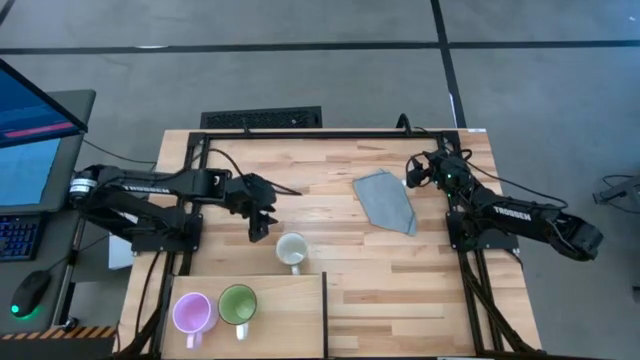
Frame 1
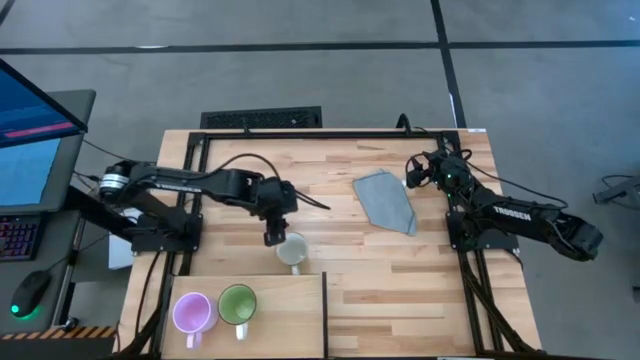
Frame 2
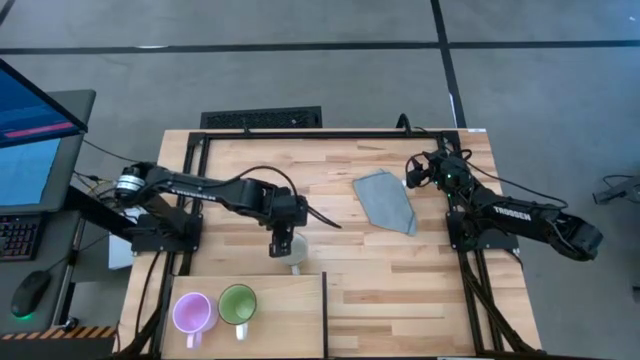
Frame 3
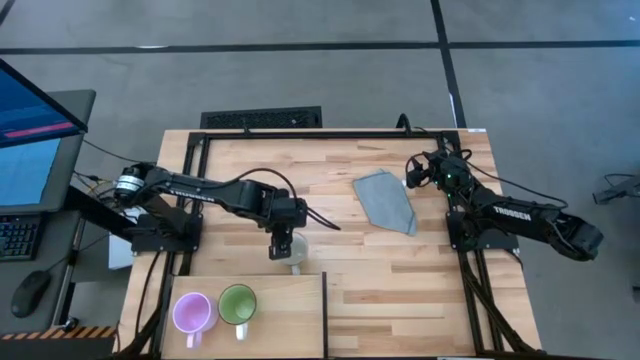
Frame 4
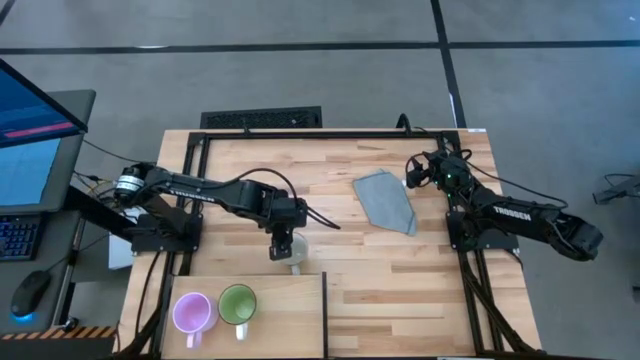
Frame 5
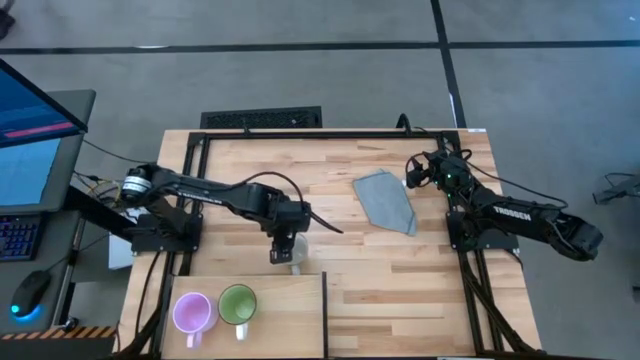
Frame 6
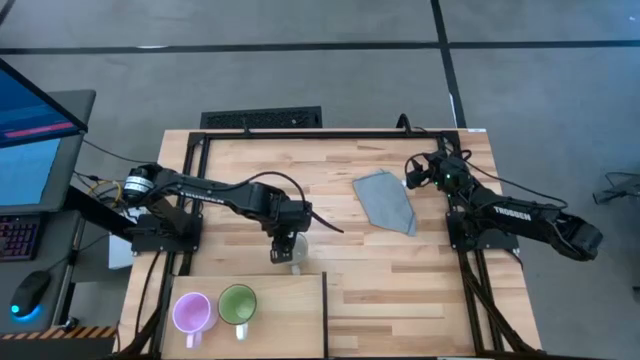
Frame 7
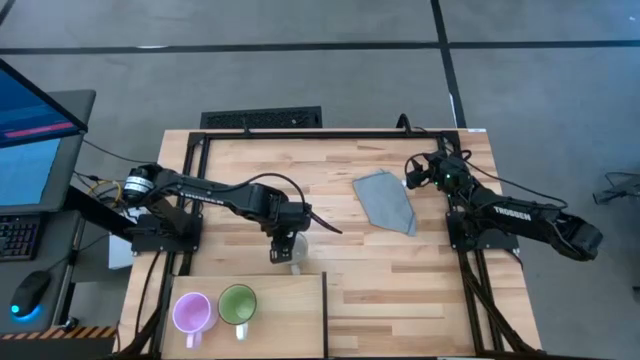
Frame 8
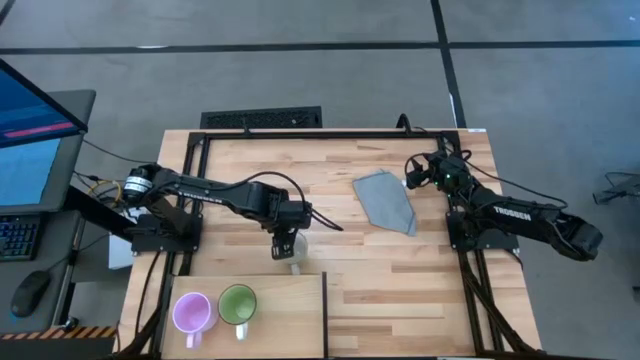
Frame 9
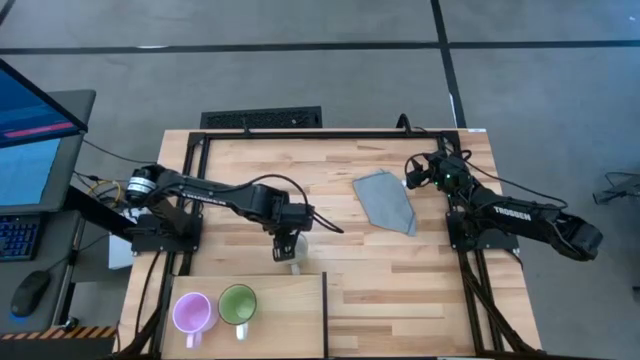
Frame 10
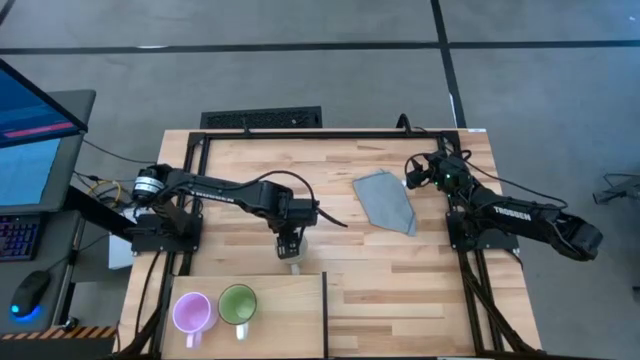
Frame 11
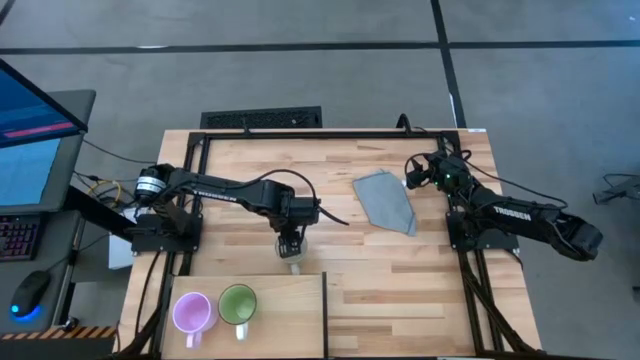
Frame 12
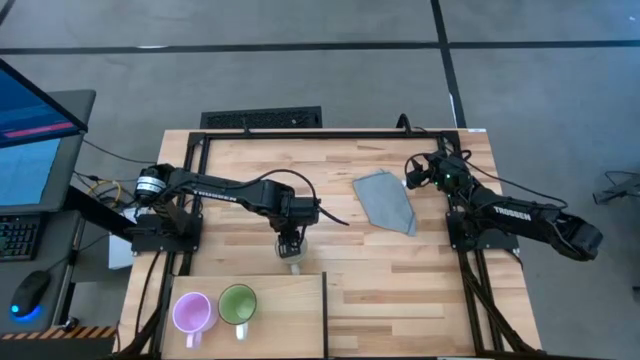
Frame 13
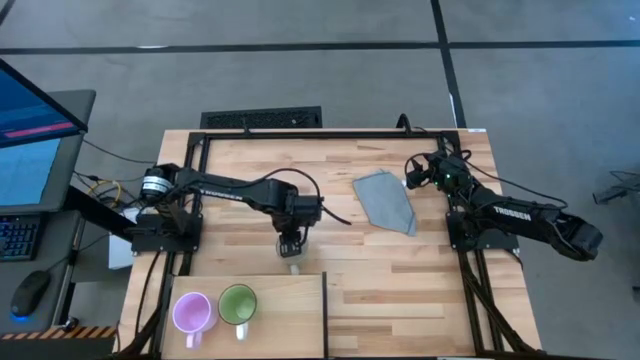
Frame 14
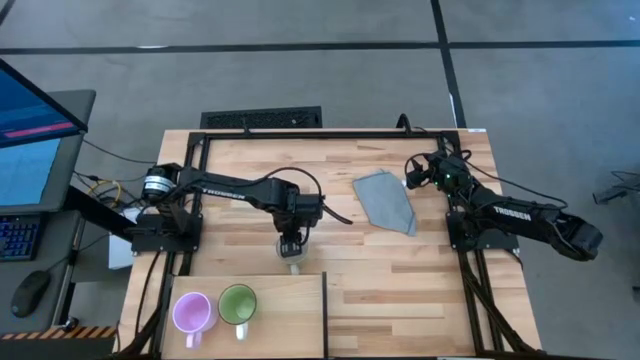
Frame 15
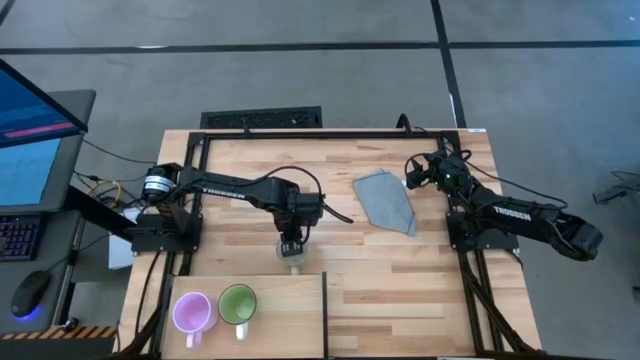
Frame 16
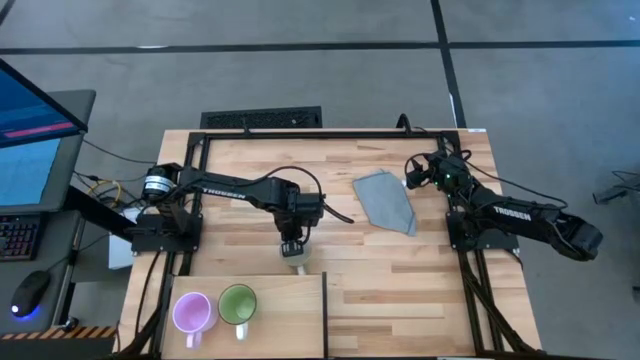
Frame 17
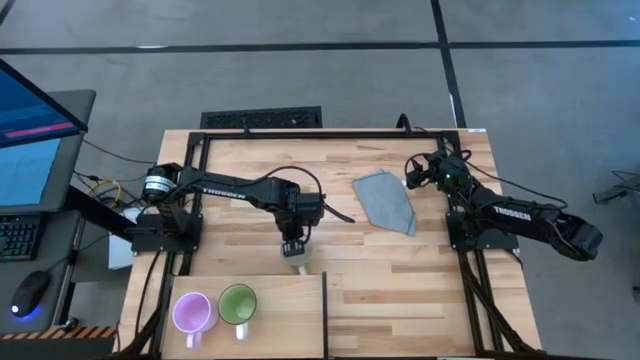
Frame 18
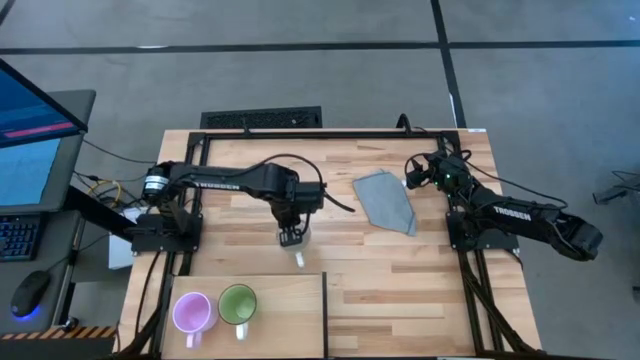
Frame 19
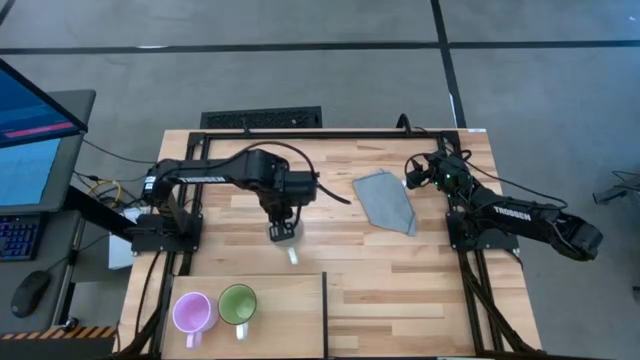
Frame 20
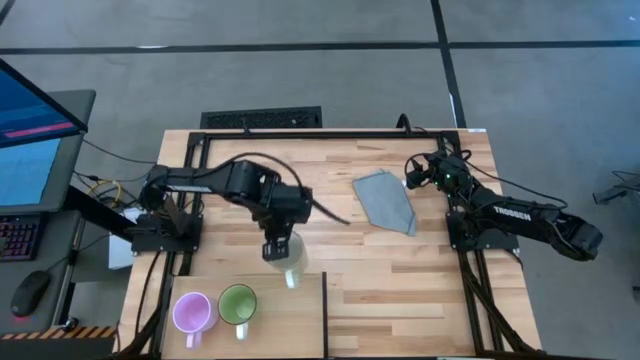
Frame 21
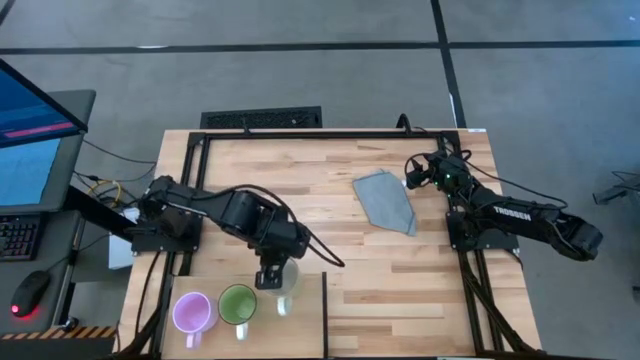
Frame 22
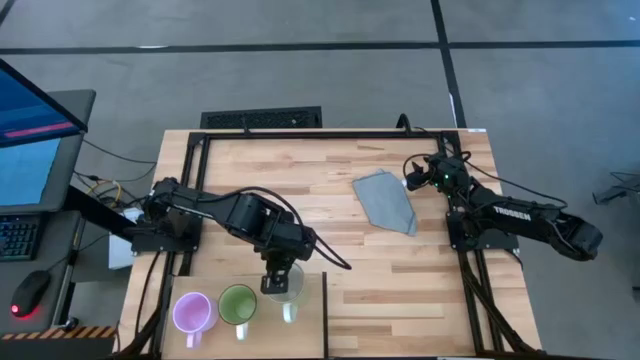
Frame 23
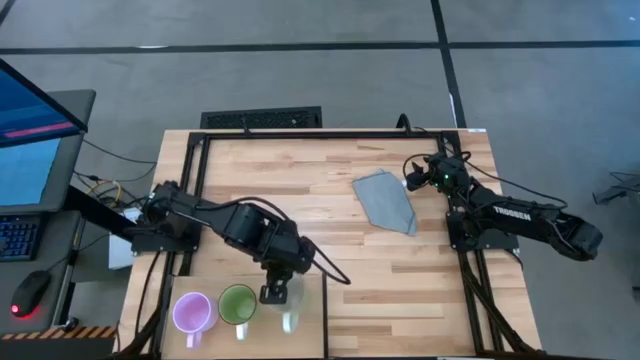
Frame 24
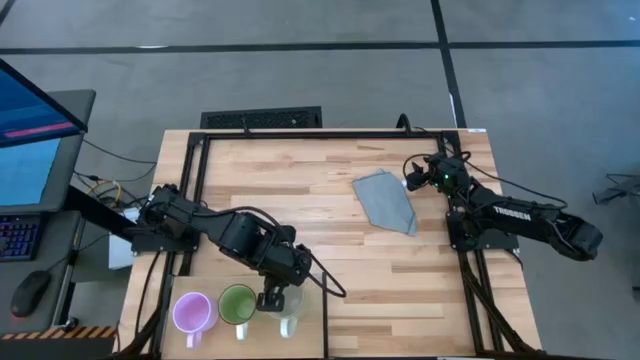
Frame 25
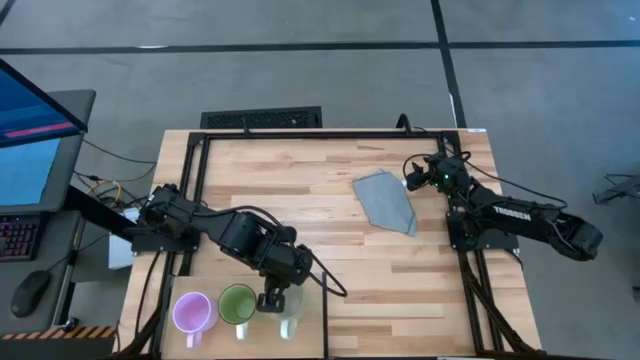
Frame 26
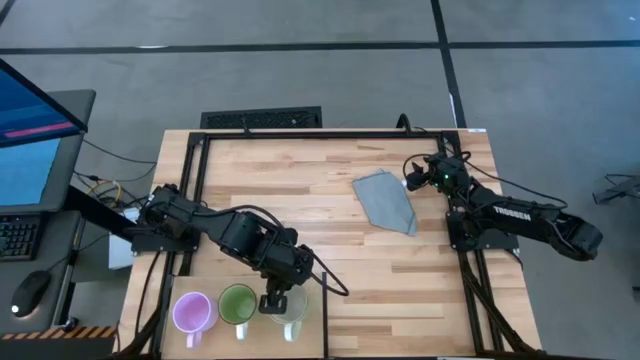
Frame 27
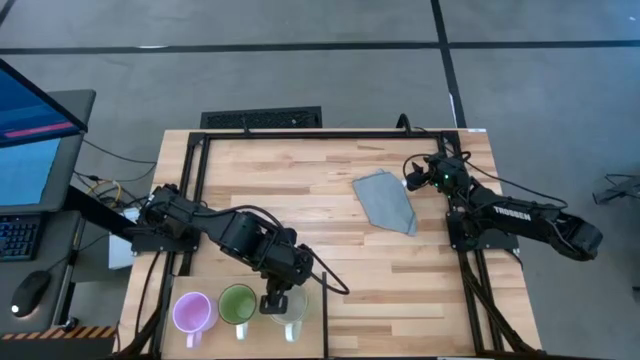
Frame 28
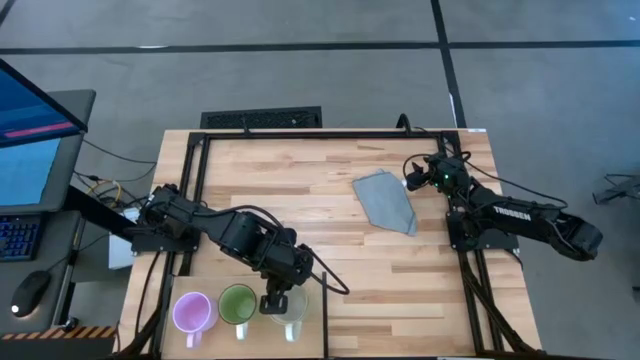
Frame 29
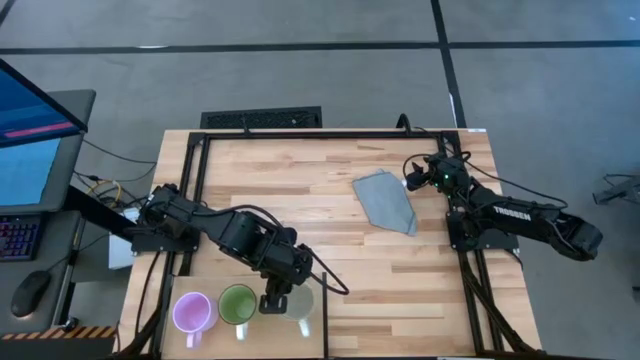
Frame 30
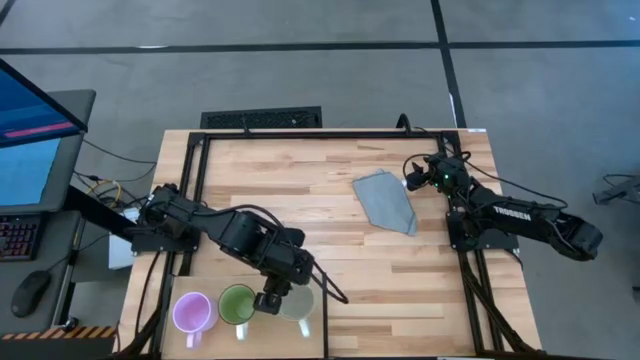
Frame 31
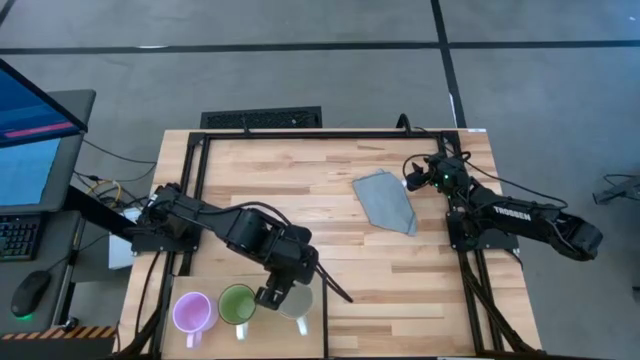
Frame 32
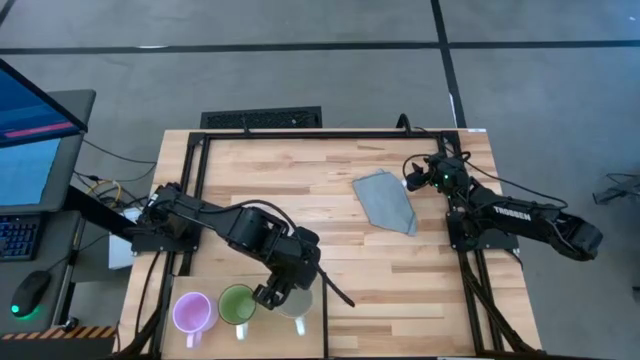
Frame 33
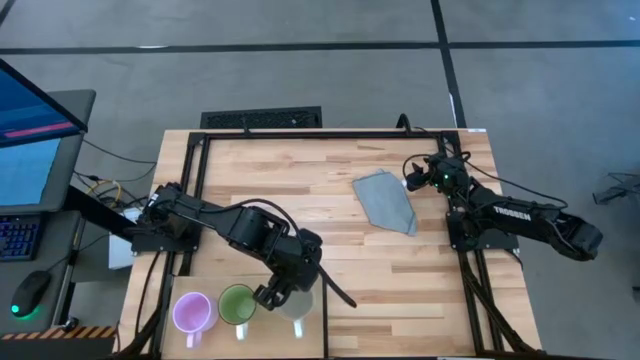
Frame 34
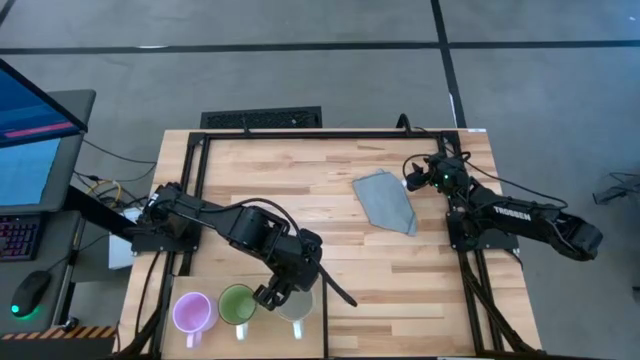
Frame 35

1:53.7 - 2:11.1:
Task: Stack small to large cups/mugs on shelf
Put the light green mug on the shelf

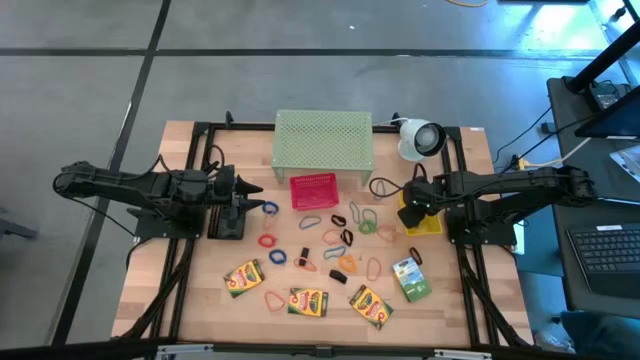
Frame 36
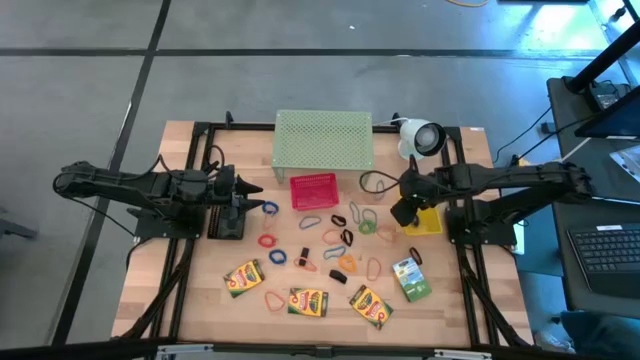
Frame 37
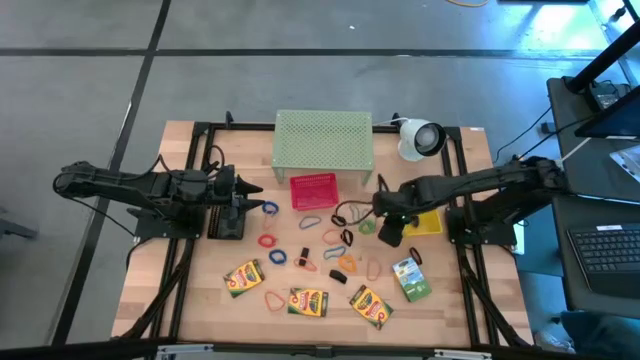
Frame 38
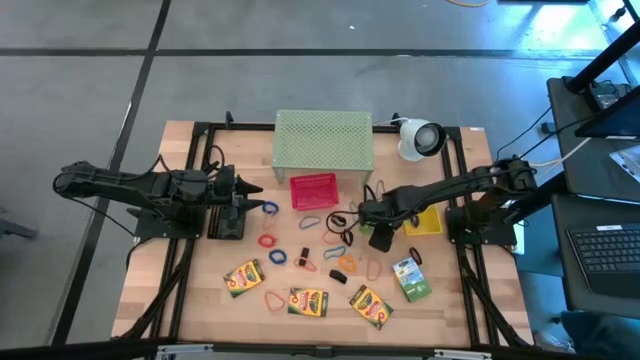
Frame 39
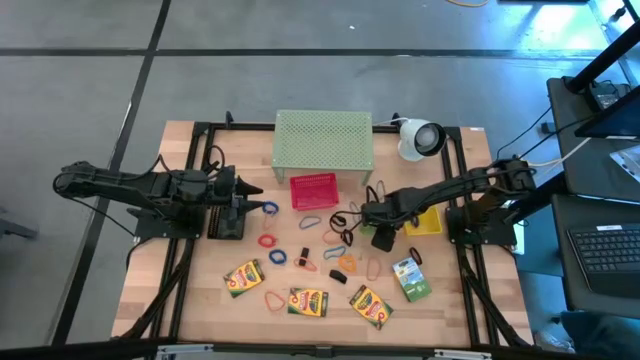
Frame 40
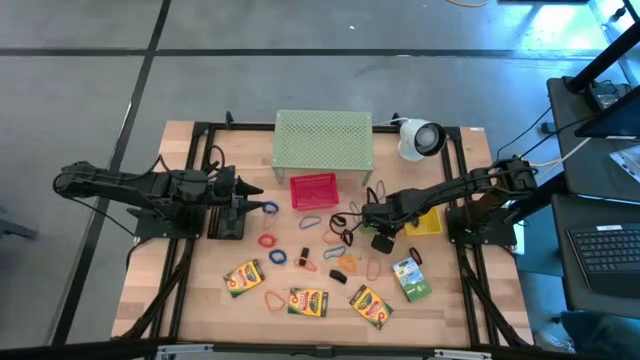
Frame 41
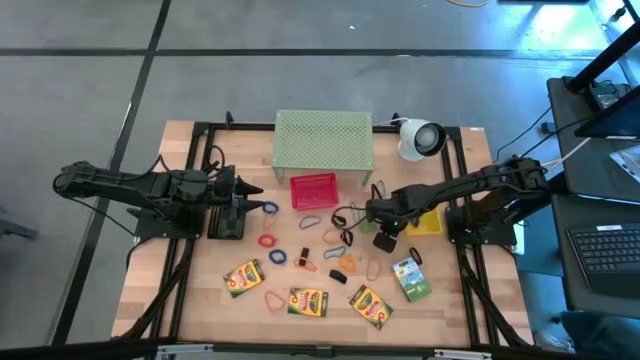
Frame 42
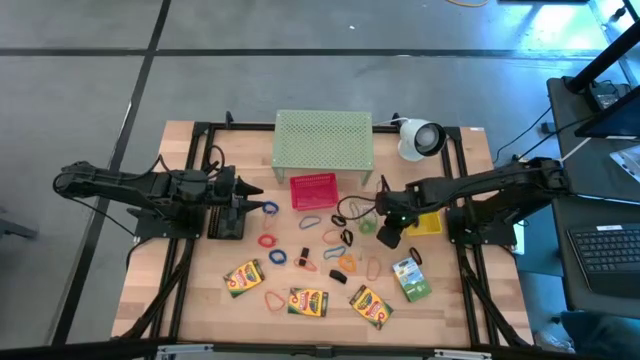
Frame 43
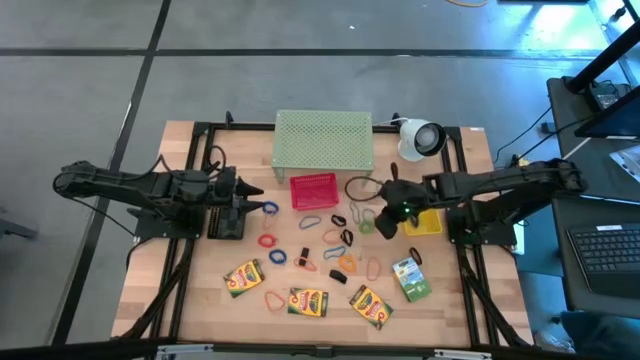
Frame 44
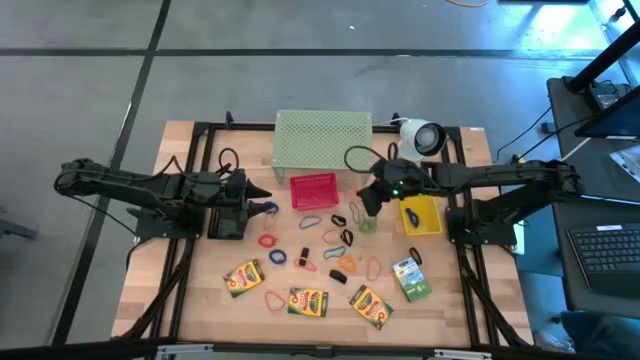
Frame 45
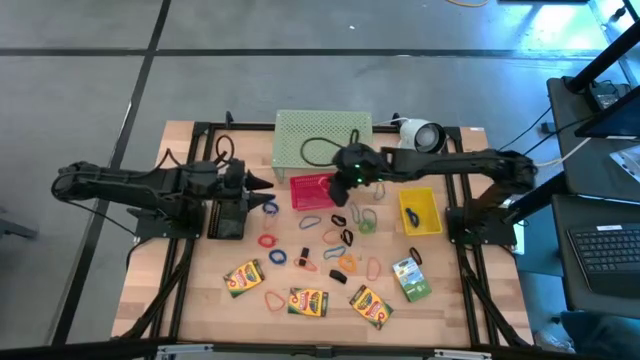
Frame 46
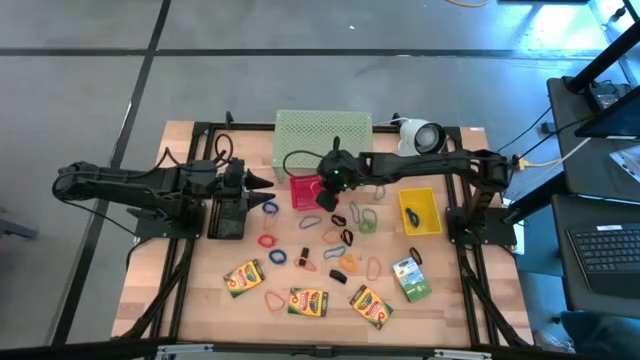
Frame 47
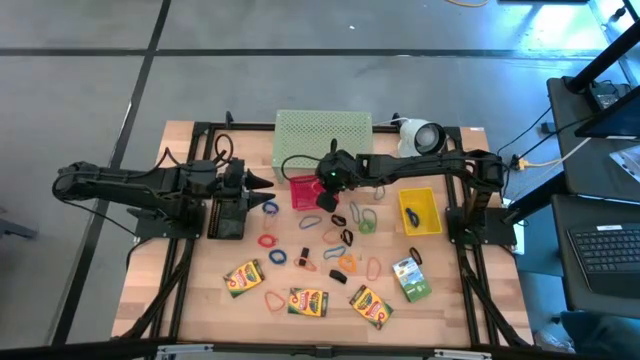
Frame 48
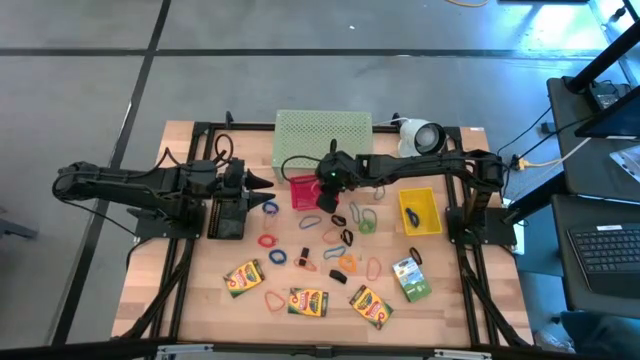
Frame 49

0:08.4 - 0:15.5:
Task: Pick & Place Office Desk Supplies
Put the orange rubber band into the red bin
